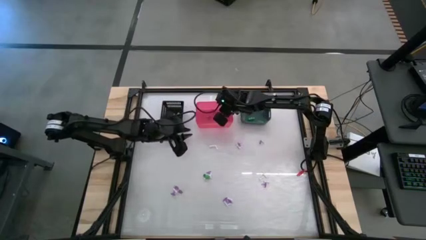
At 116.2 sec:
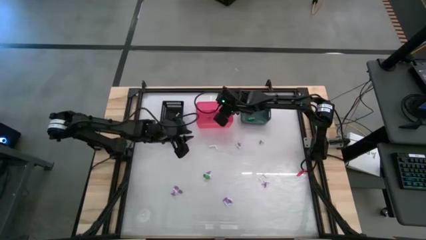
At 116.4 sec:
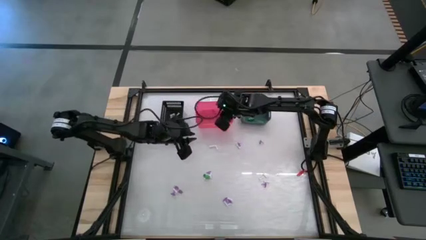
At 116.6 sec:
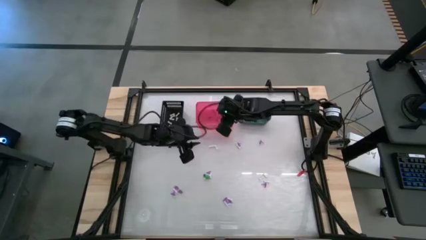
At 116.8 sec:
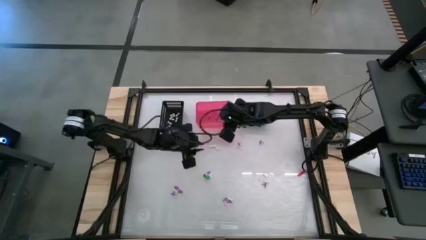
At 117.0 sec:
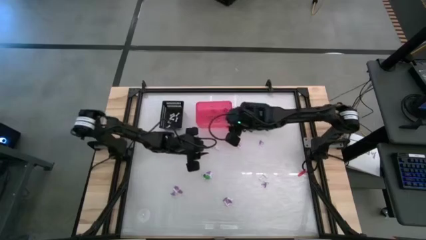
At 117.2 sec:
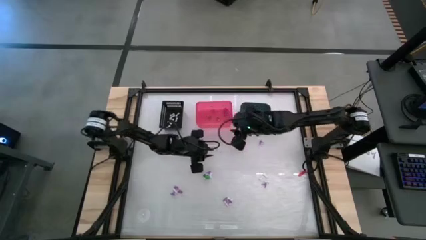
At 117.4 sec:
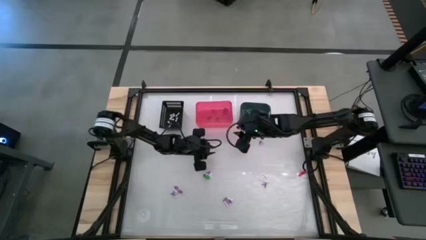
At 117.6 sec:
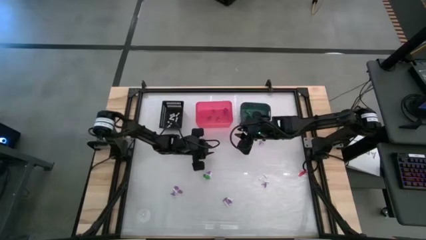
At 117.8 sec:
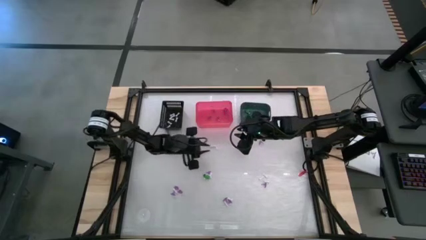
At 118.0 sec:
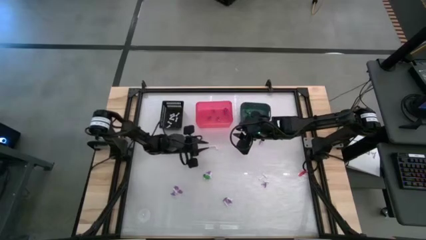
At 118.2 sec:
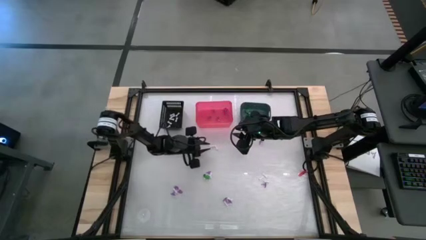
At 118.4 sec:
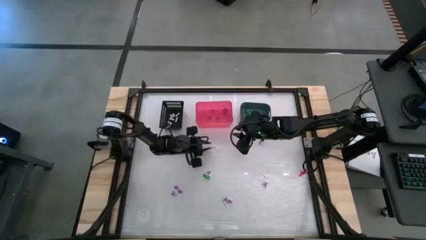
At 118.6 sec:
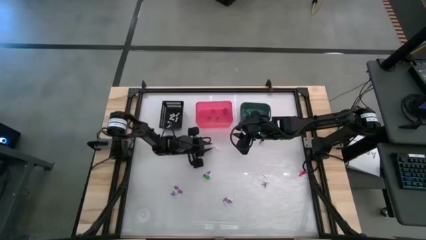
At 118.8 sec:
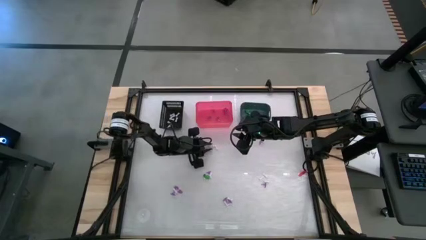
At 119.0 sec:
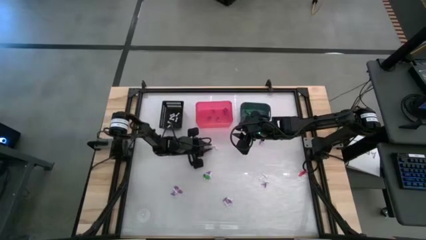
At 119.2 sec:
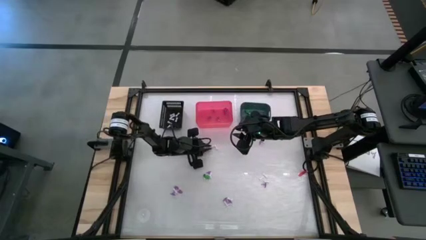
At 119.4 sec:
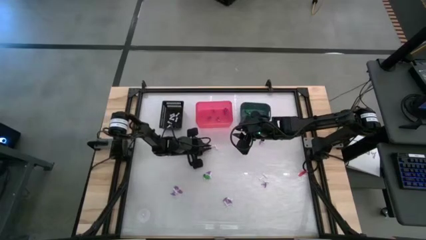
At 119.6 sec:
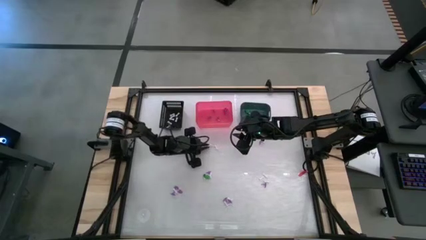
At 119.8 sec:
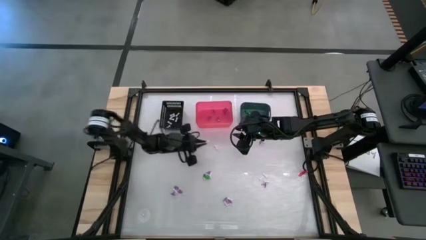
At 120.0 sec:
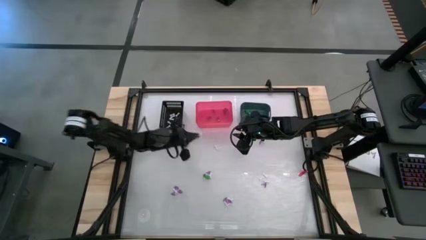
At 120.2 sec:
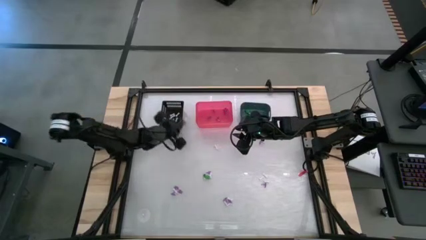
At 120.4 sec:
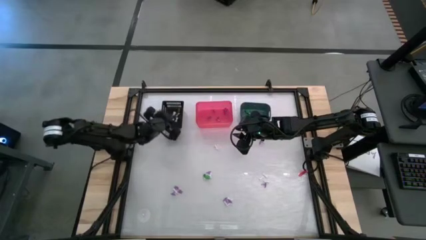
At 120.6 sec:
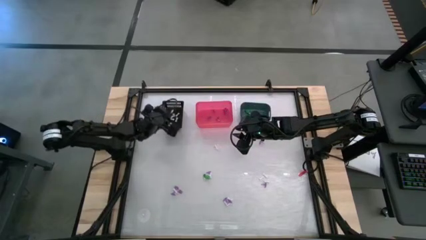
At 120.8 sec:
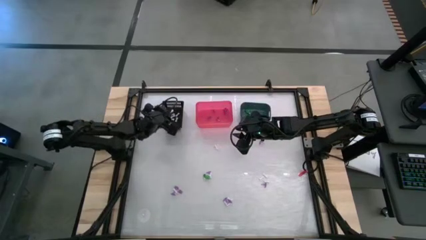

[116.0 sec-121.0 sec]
Task: Sort Halloween decoration
Put the white bone toy into the black bin

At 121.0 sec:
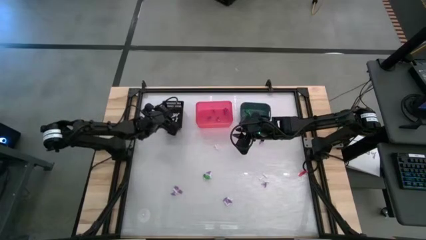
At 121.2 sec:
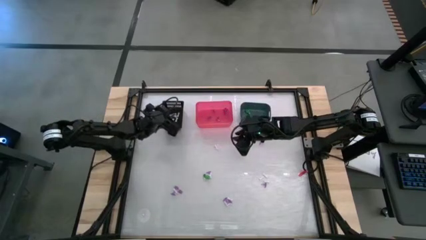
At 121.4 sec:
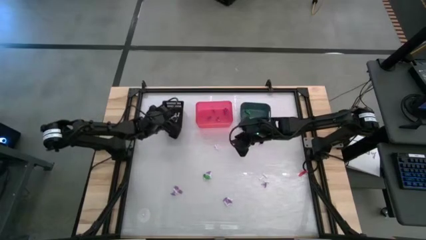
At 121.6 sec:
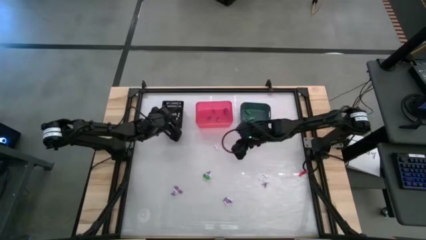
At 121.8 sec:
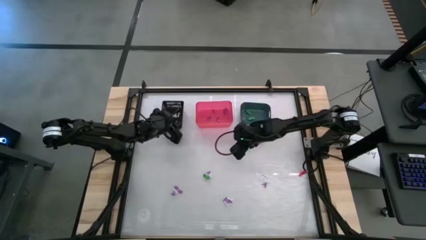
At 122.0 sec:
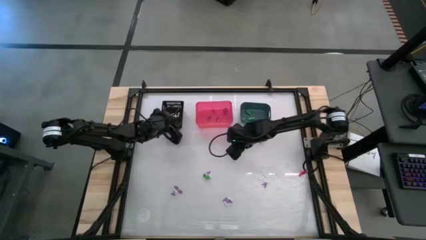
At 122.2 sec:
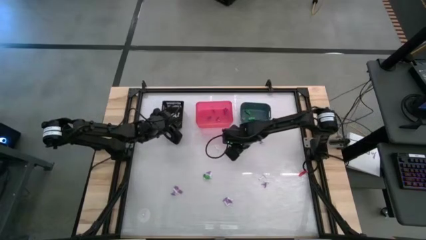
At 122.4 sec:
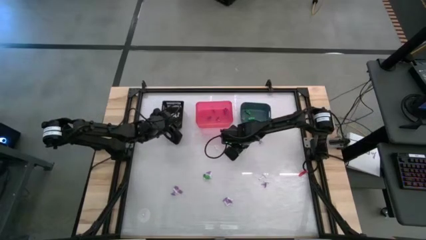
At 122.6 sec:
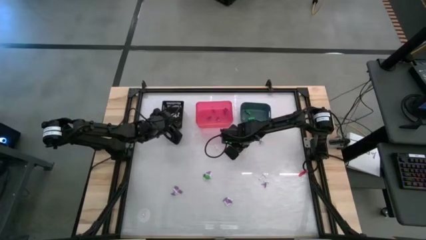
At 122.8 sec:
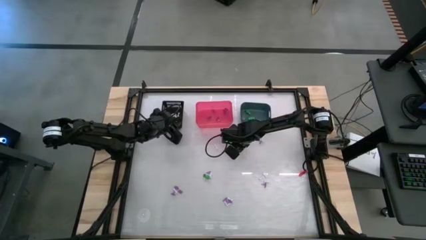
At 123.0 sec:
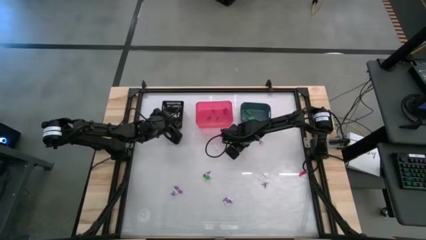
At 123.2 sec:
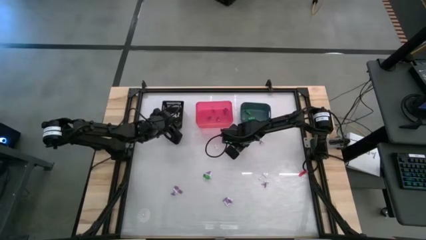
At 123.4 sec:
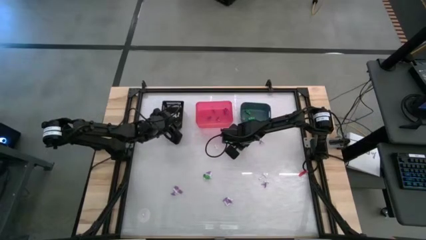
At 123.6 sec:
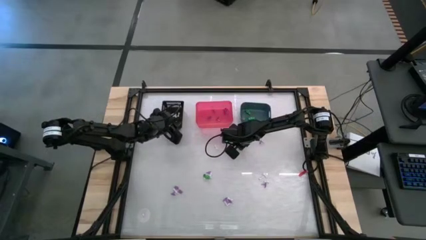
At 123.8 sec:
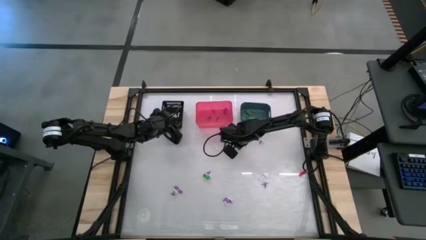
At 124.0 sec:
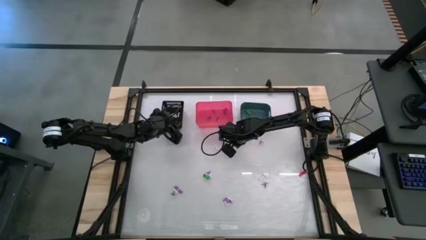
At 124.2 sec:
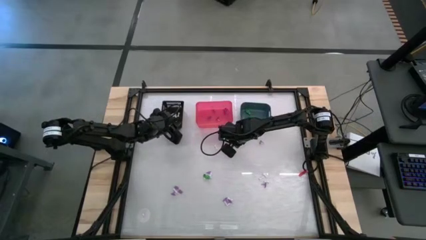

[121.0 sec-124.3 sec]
Put the purple hat toy into the pink bin

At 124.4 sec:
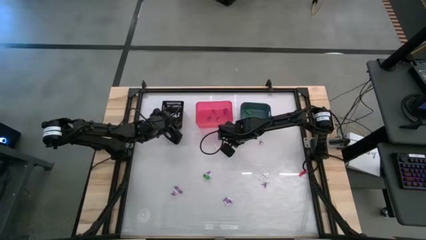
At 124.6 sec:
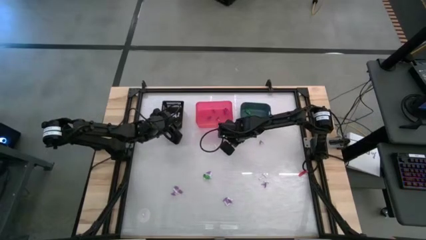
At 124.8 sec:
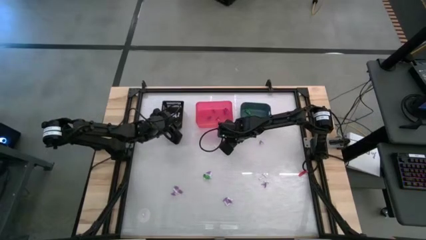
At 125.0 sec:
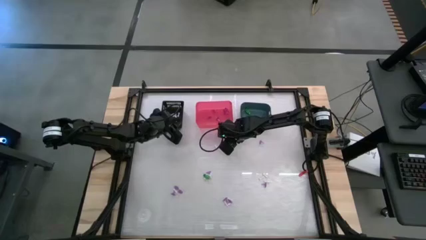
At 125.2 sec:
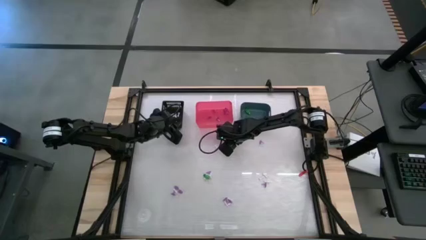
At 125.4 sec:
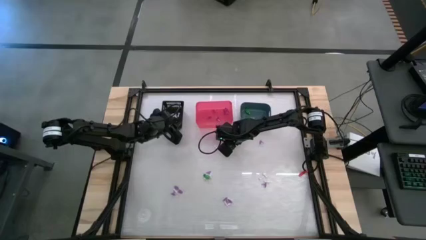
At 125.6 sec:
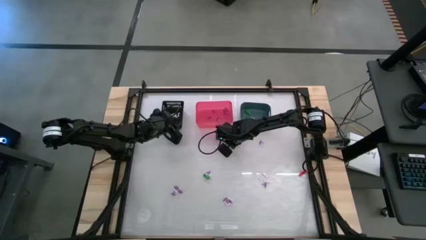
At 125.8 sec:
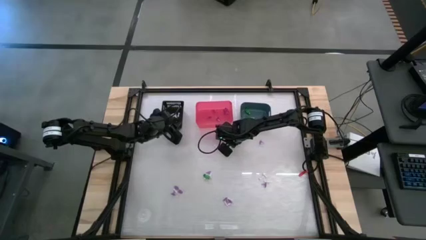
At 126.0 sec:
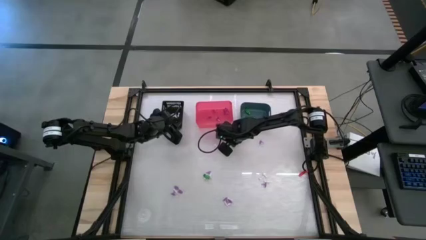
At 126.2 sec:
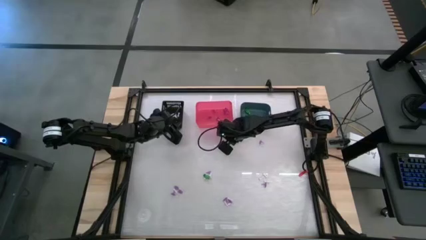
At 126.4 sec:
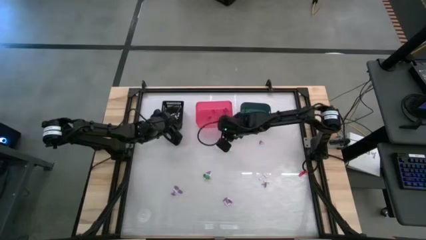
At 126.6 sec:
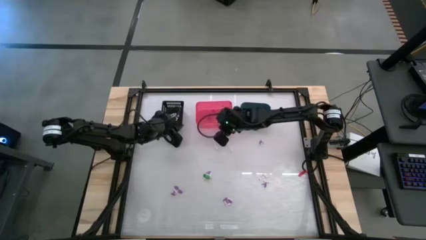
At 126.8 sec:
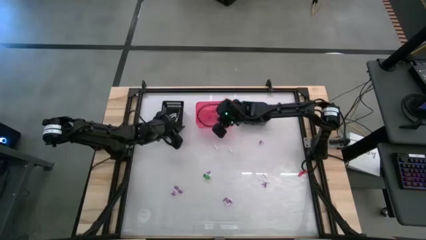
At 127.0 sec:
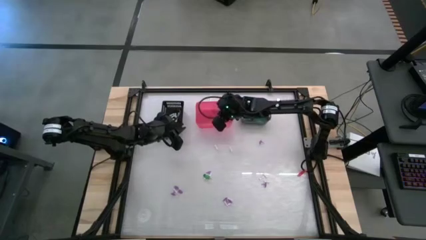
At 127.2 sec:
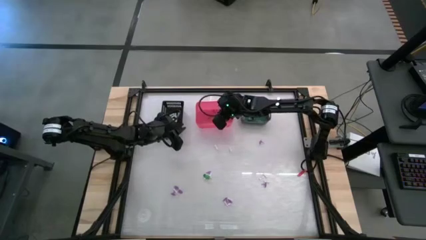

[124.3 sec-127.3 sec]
Put the purple hat toy into the pink bin

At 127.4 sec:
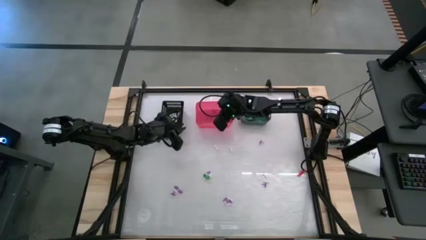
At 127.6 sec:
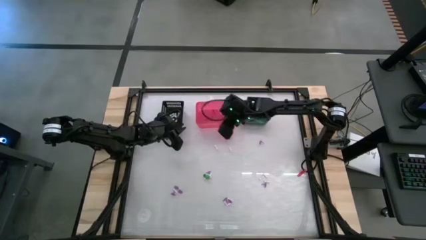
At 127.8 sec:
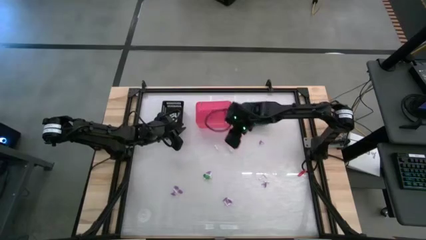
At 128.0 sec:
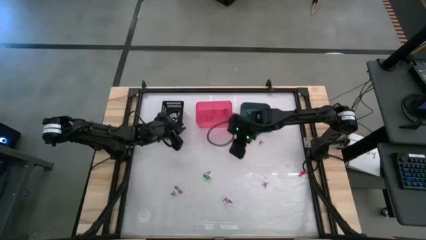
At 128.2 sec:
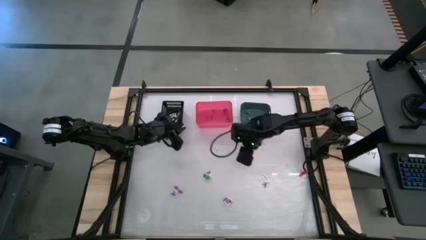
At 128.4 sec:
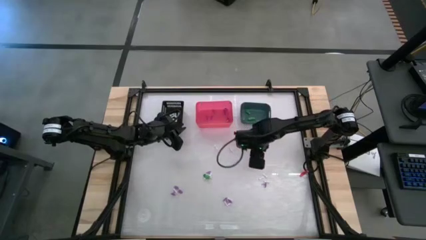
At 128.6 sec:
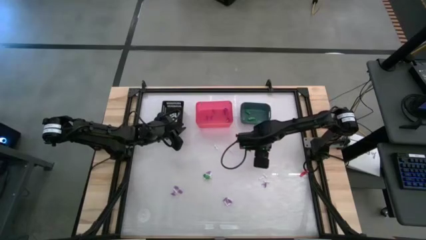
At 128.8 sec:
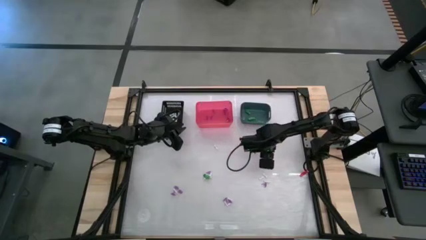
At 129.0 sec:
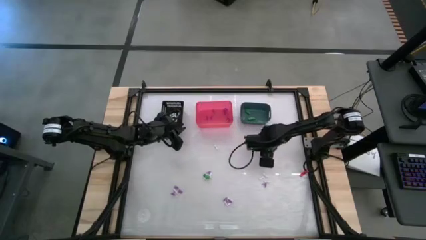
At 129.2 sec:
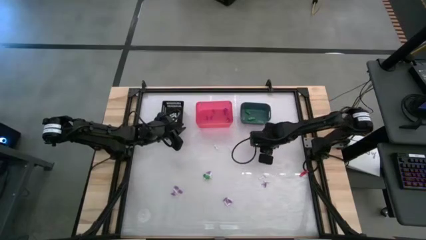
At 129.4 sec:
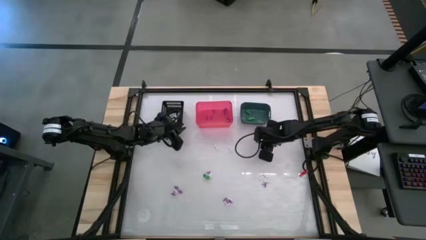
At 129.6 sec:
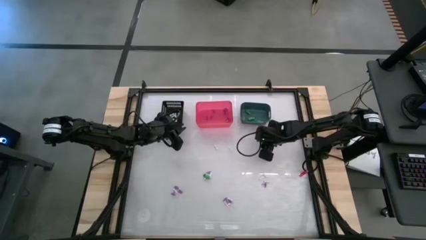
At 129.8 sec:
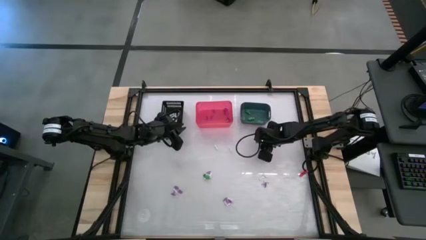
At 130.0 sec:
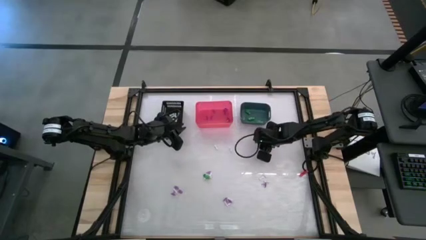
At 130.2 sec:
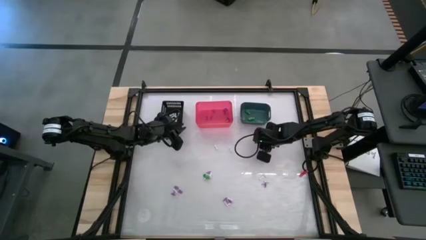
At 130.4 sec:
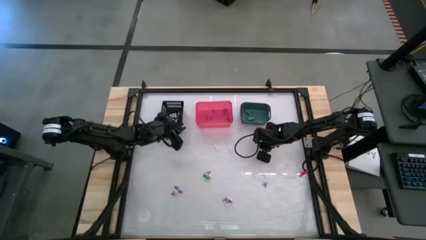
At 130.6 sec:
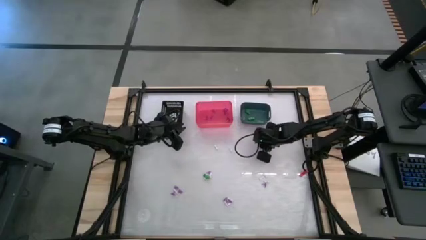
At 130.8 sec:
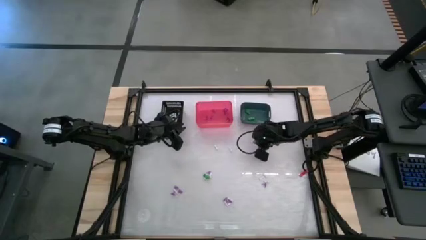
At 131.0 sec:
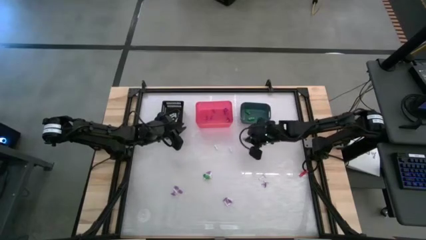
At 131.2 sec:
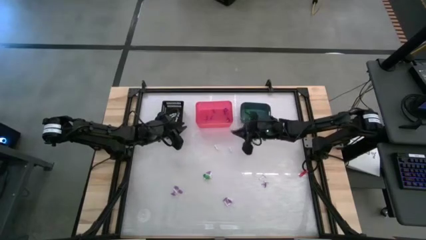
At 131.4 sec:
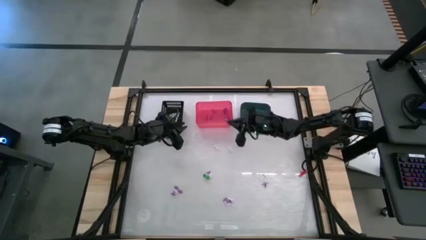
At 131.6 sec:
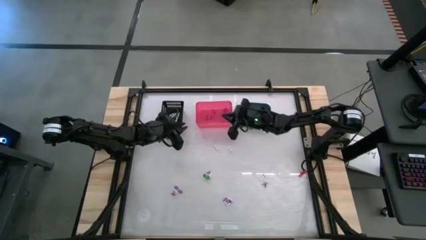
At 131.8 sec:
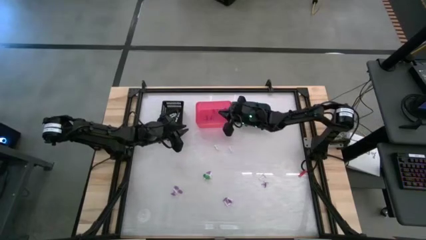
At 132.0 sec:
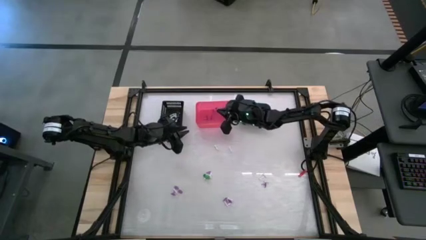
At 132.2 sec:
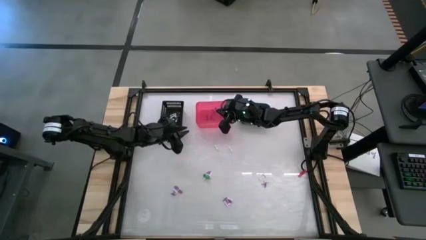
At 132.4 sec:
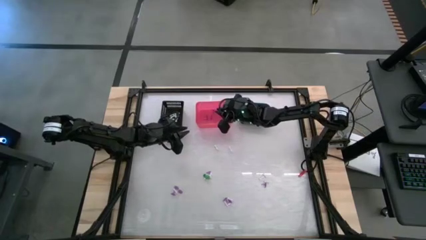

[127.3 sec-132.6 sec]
Put the purple hat toy into the pink bin
